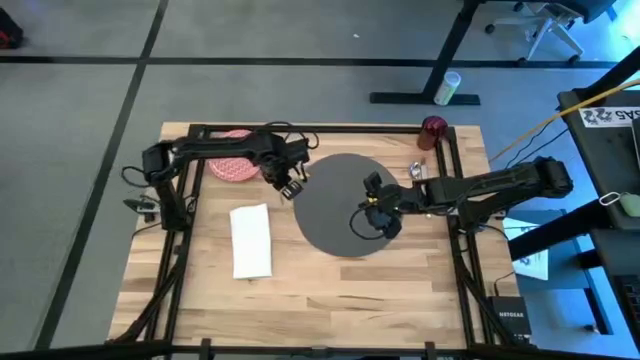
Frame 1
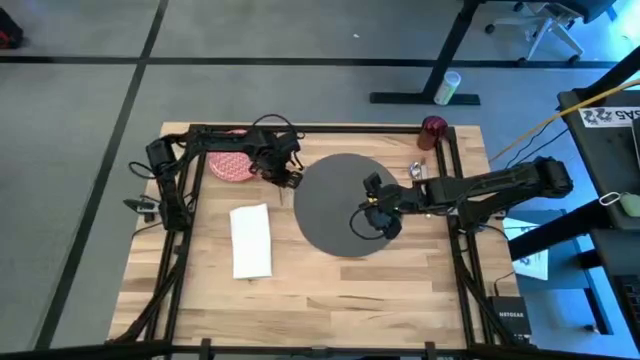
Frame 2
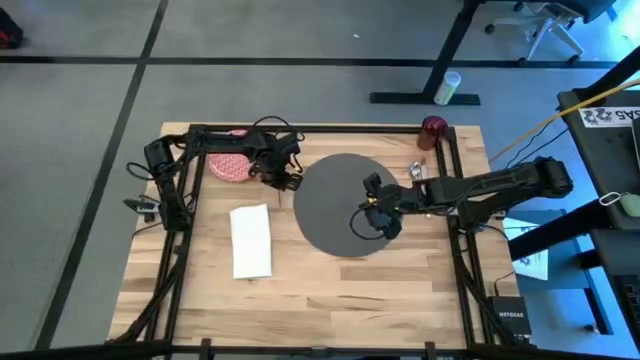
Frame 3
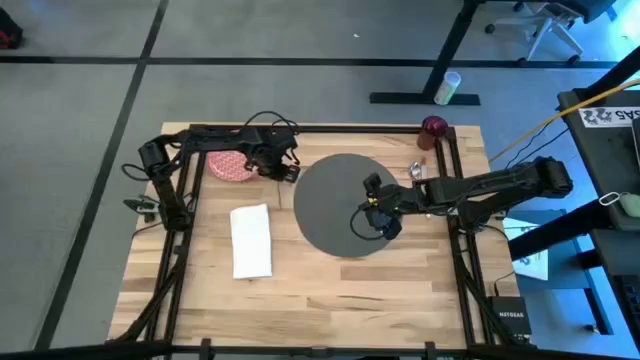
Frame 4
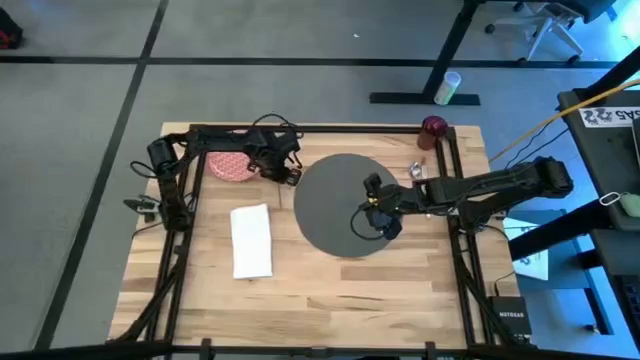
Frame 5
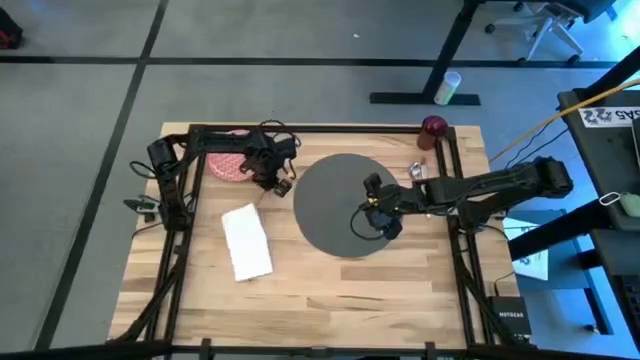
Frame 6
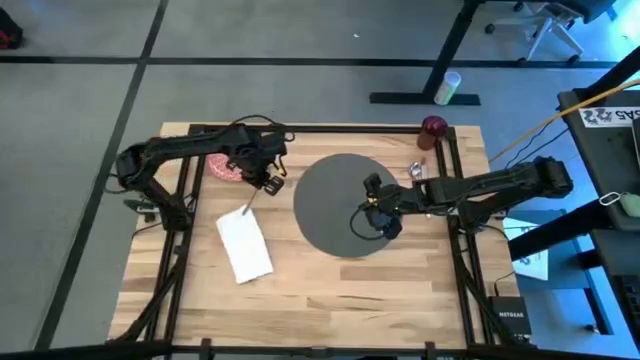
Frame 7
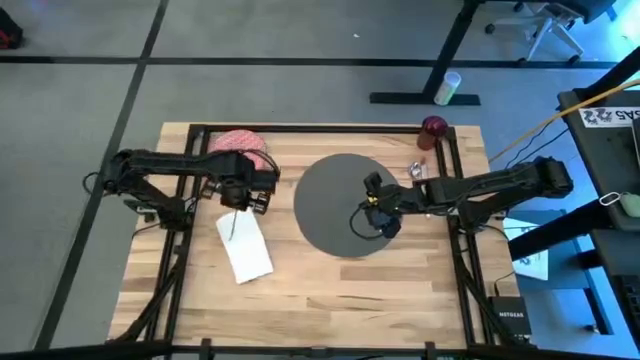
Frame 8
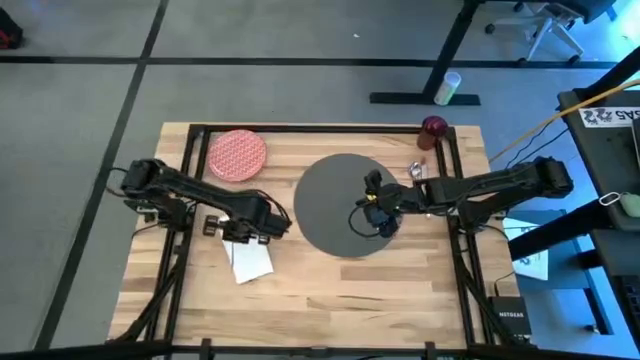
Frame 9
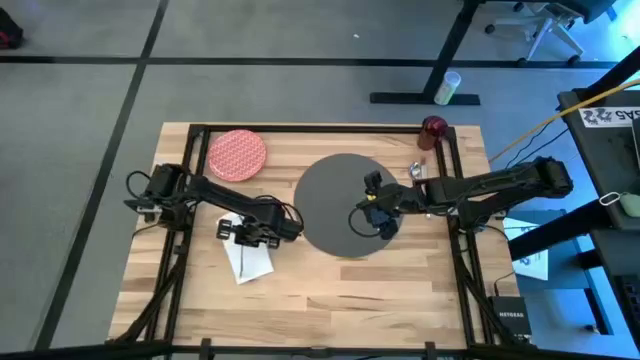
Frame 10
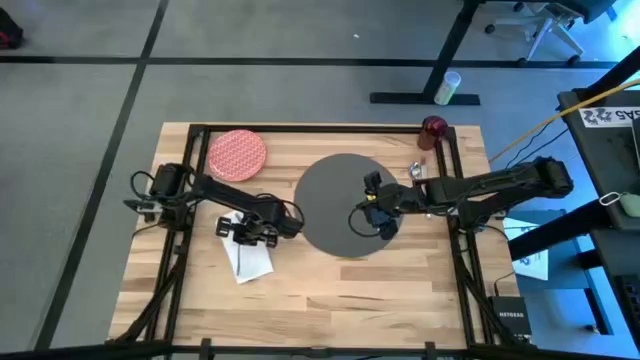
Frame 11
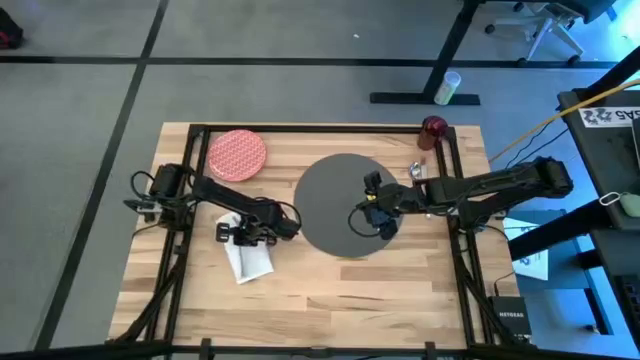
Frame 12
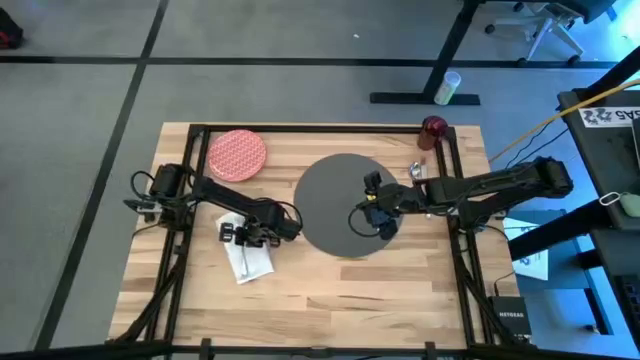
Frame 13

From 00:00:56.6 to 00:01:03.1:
Task: Set table place
Put the silver fork on the table white napkin

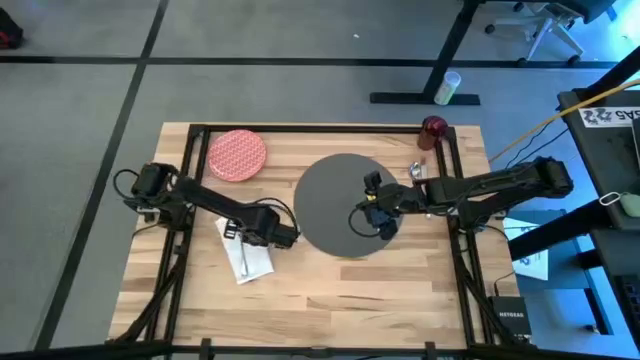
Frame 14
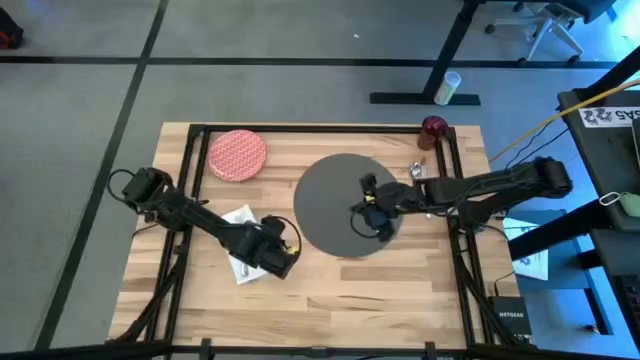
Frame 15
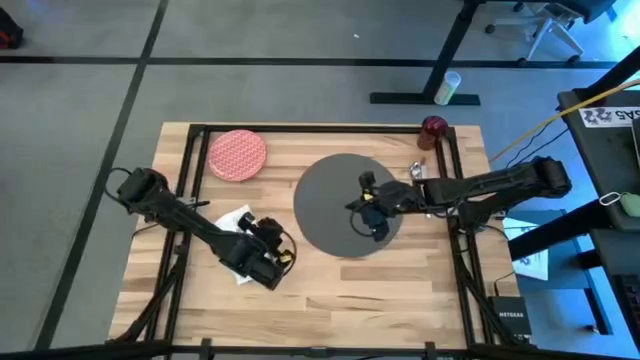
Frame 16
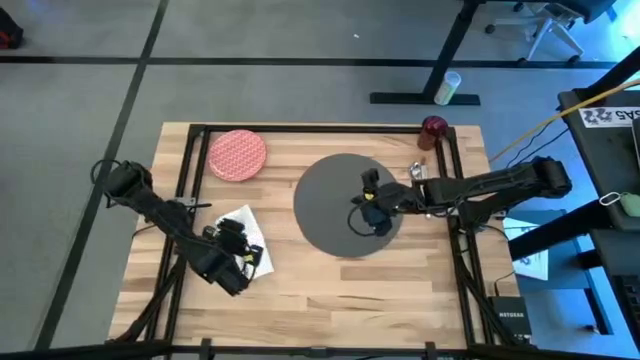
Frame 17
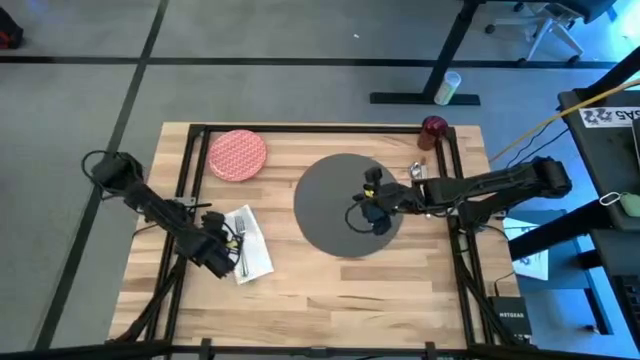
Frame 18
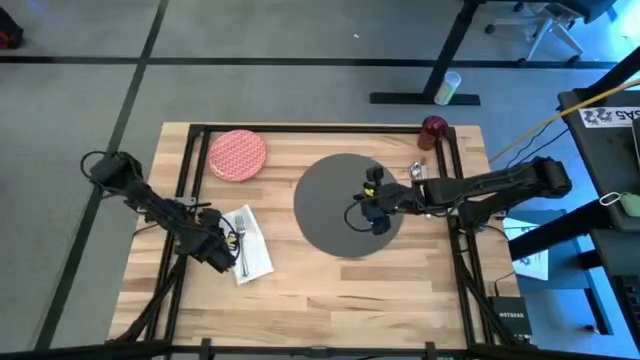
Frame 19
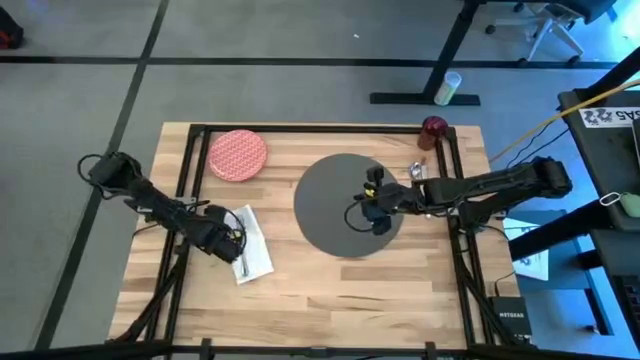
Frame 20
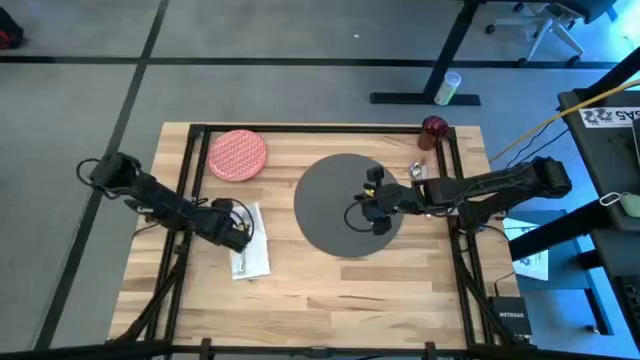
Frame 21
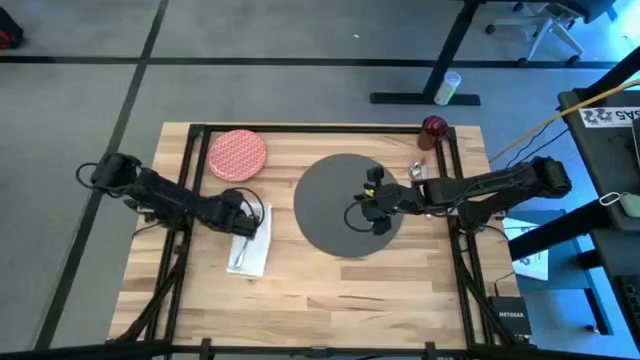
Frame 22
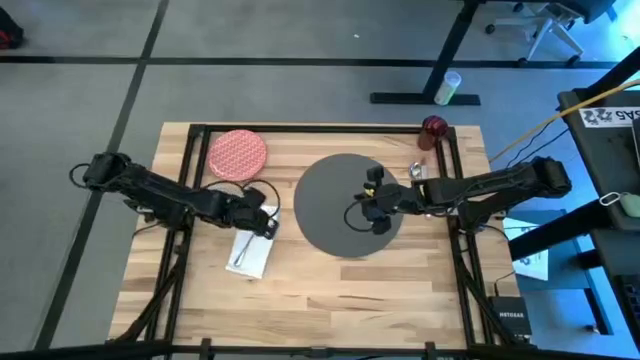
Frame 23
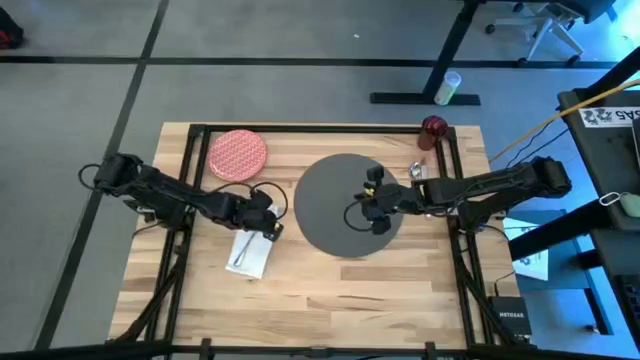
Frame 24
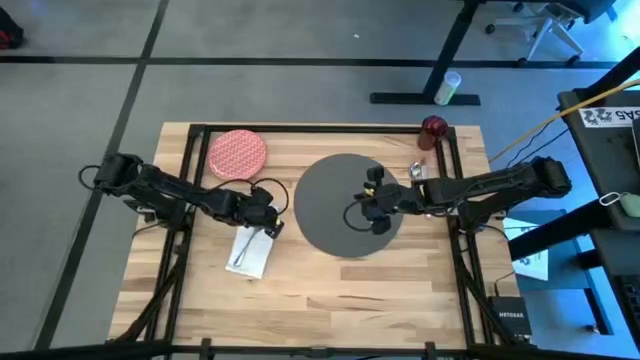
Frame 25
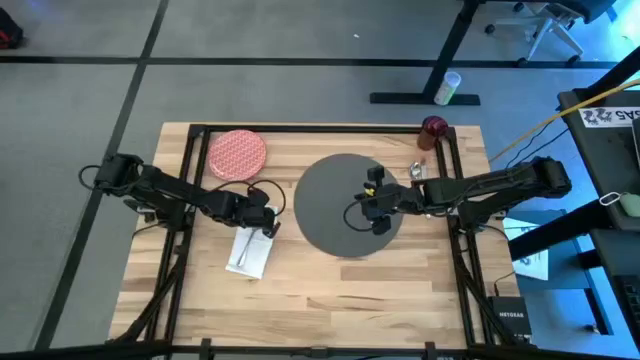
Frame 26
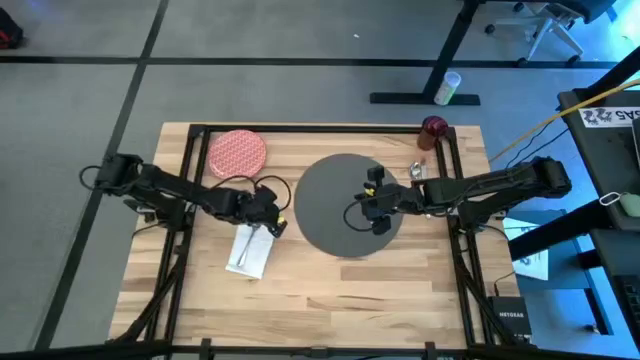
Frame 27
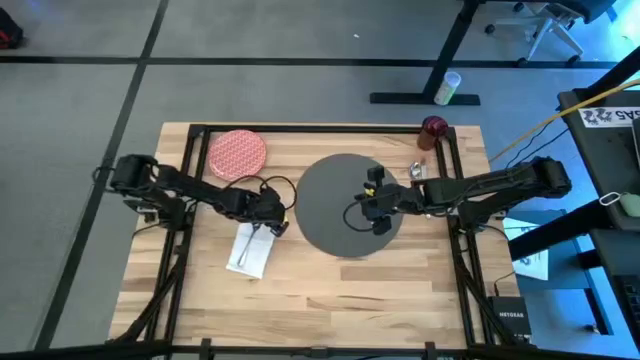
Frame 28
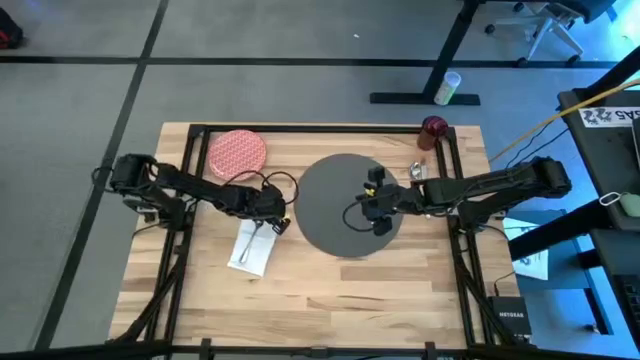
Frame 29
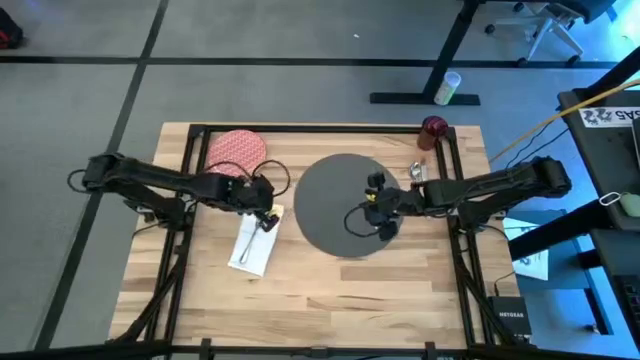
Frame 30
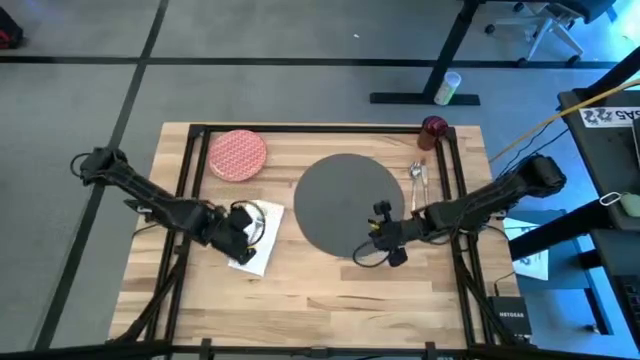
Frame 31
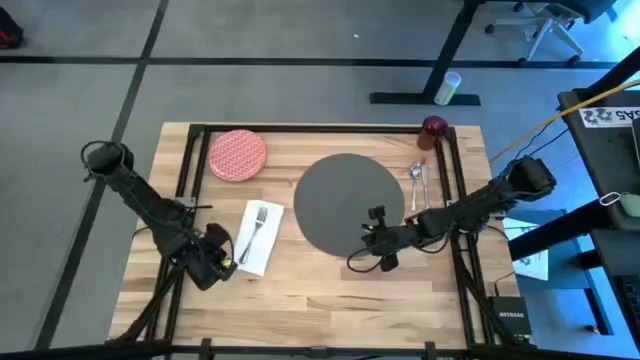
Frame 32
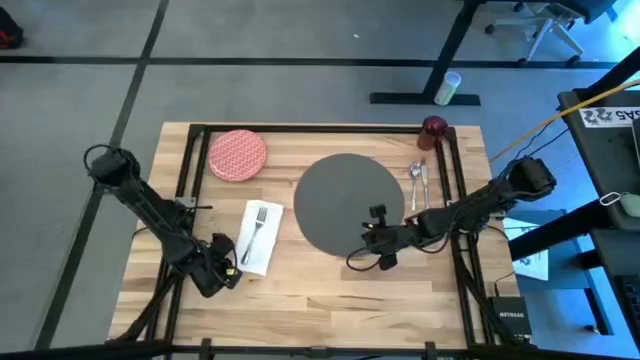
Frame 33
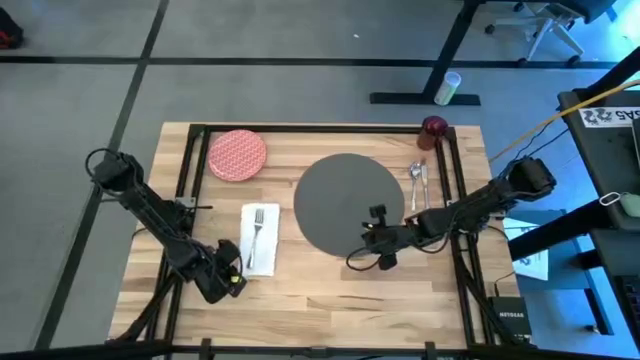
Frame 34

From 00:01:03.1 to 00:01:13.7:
Adjust the white table napkin

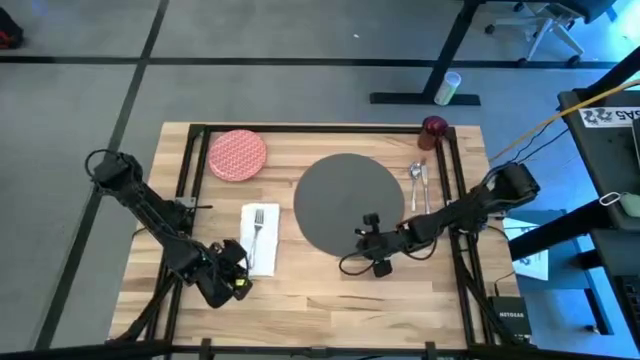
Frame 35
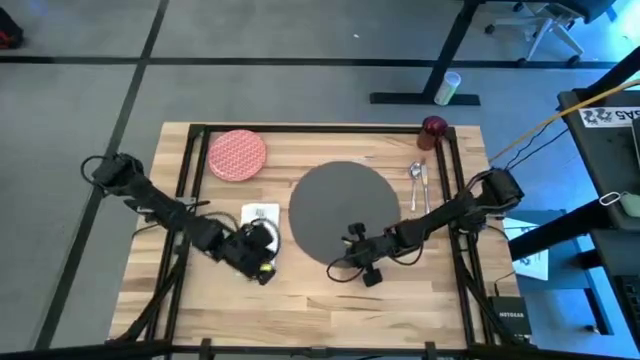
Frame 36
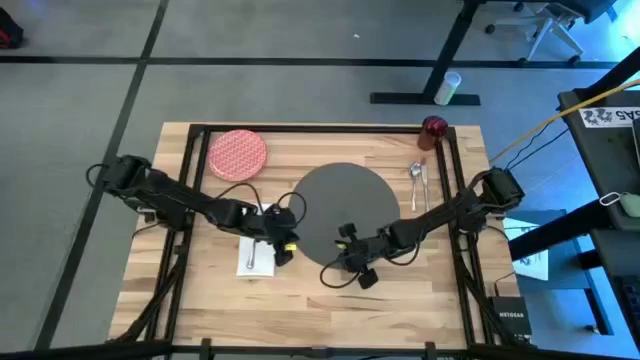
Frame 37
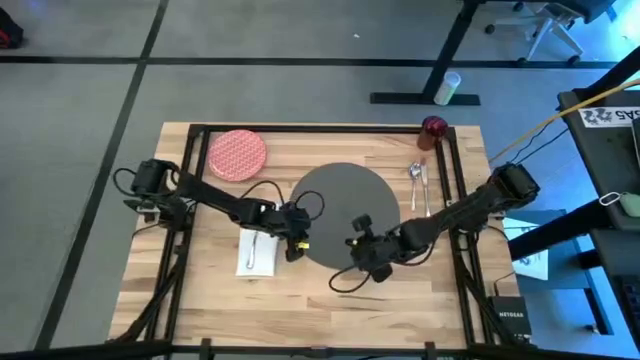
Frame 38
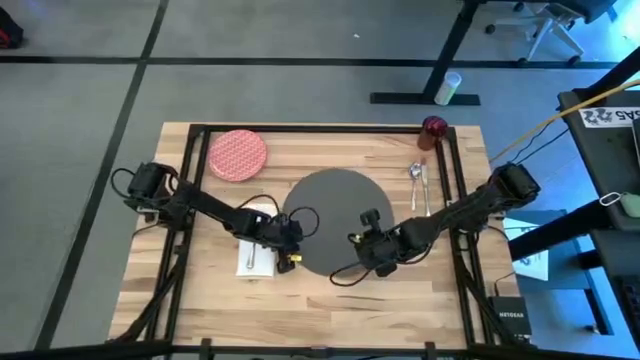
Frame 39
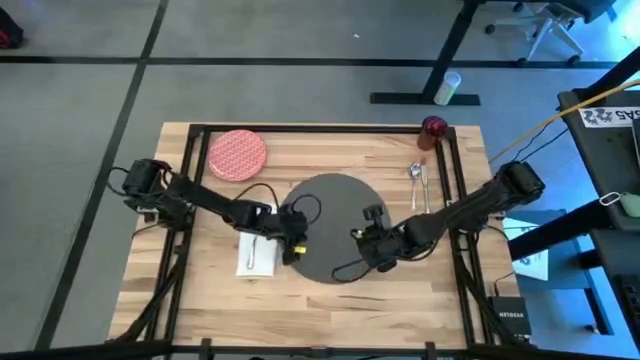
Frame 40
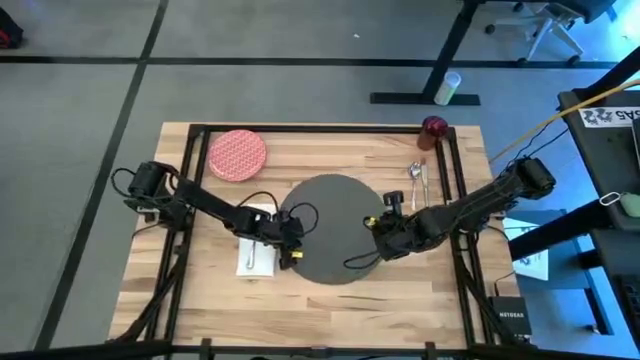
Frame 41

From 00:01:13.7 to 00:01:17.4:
Adjust the gray placemat
